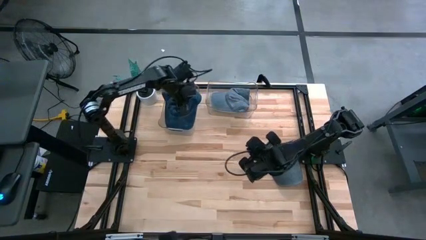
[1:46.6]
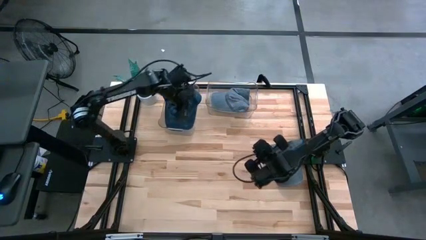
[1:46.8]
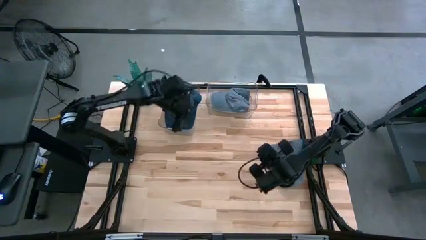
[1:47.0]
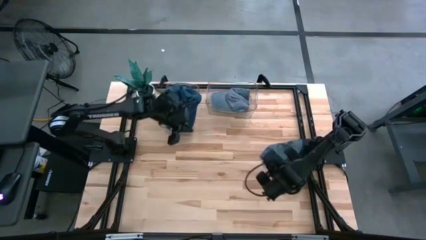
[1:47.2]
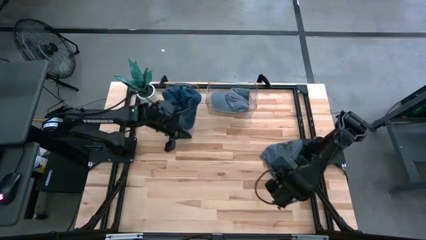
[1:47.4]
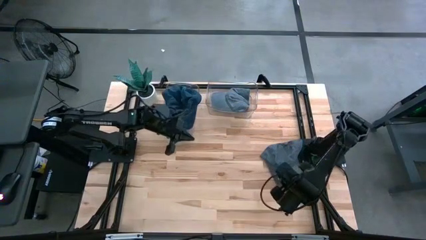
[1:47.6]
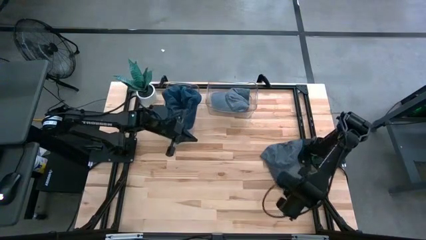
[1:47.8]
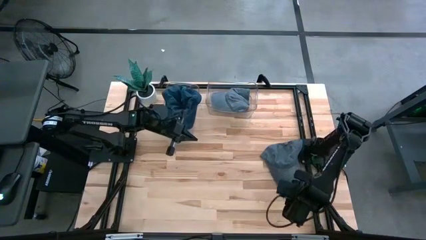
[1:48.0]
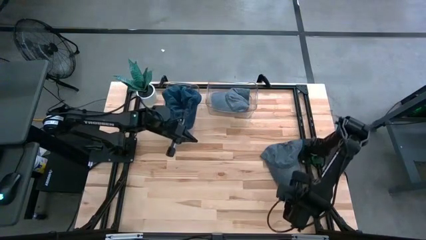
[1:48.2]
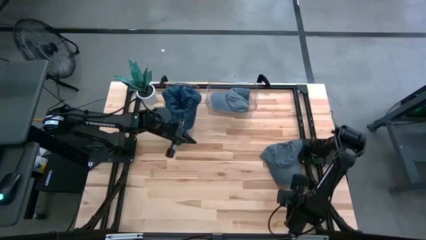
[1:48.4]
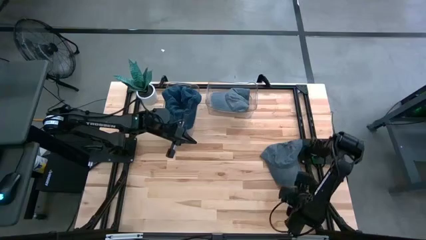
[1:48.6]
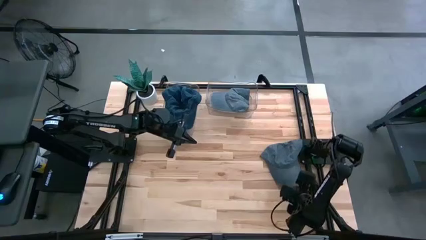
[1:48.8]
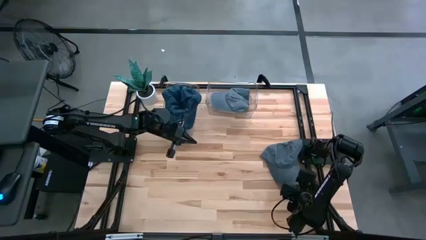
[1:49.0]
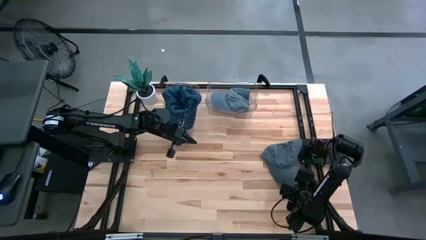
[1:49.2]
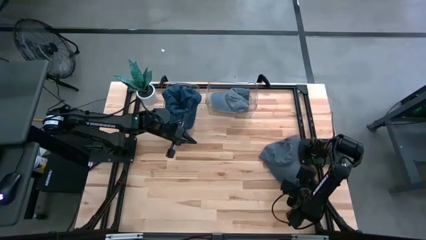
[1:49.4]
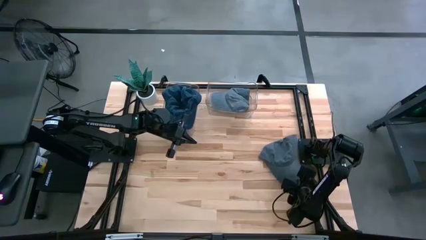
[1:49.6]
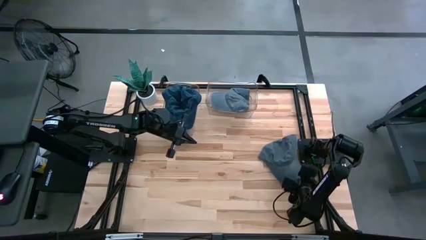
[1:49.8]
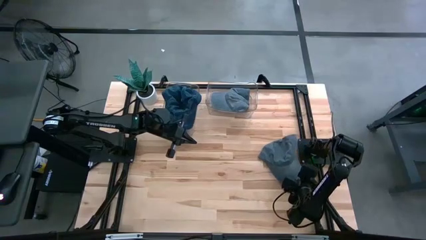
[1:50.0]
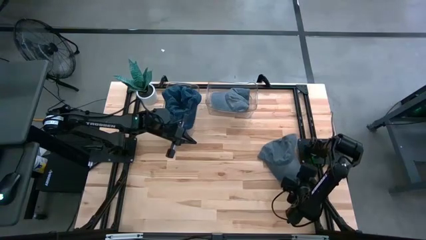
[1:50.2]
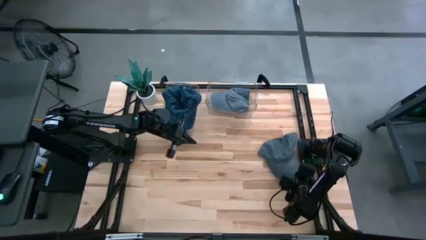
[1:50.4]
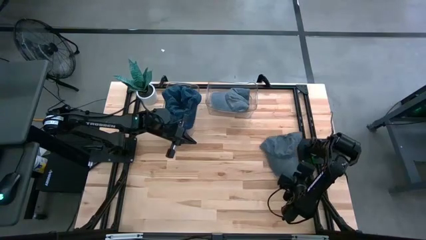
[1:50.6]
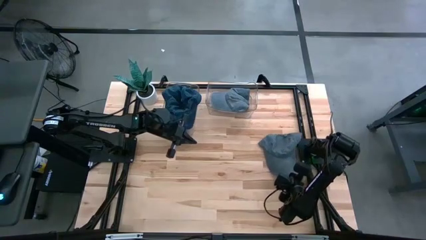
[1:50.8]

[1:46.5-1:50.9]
Task: Pick & Place hat
Put the gray cap into the right transparent bin

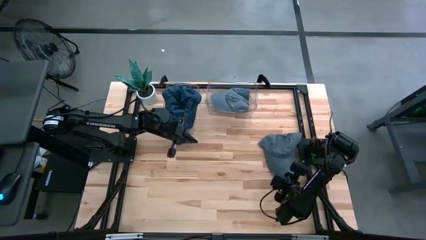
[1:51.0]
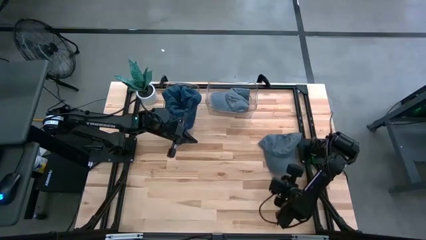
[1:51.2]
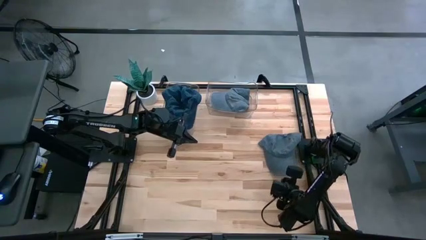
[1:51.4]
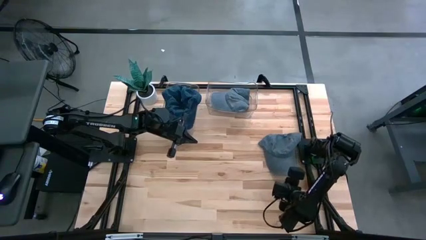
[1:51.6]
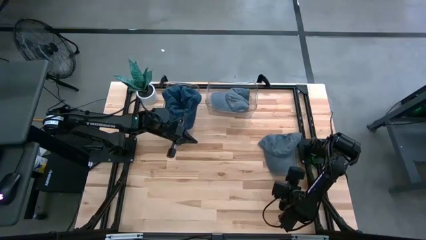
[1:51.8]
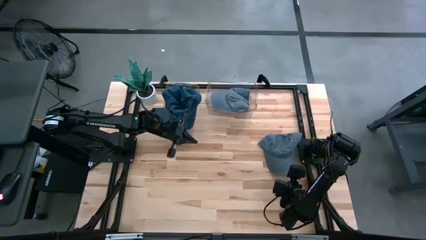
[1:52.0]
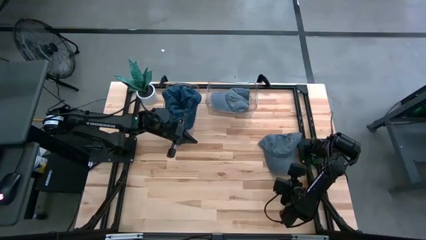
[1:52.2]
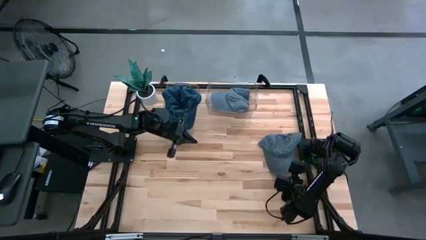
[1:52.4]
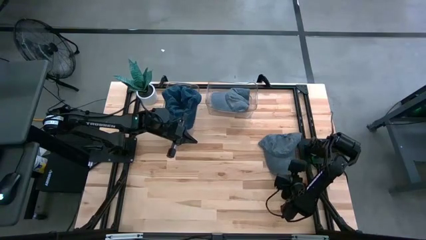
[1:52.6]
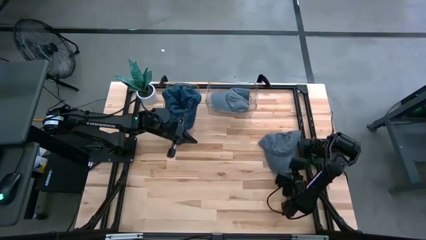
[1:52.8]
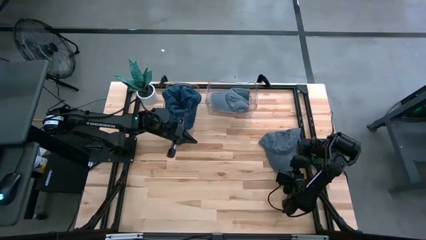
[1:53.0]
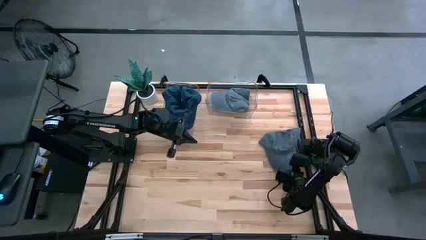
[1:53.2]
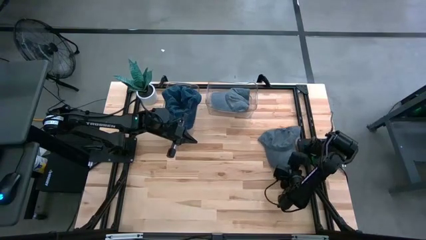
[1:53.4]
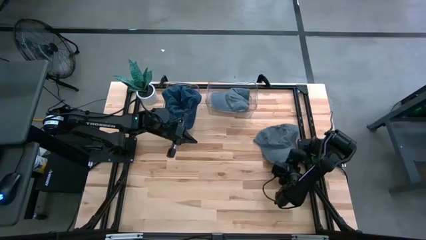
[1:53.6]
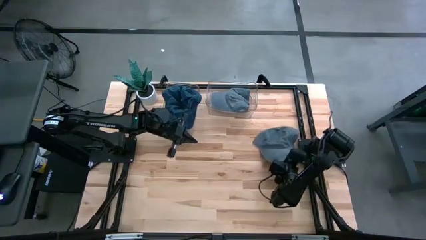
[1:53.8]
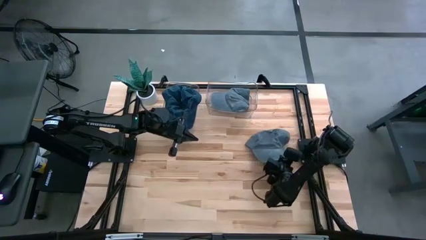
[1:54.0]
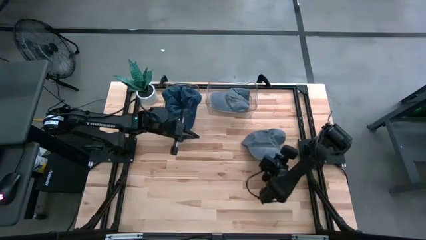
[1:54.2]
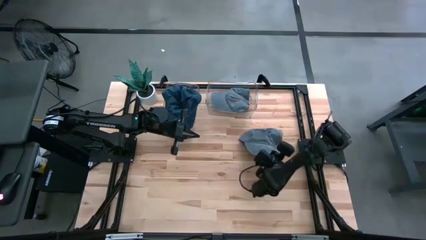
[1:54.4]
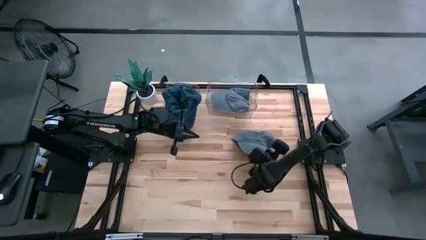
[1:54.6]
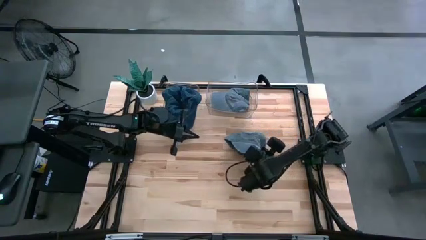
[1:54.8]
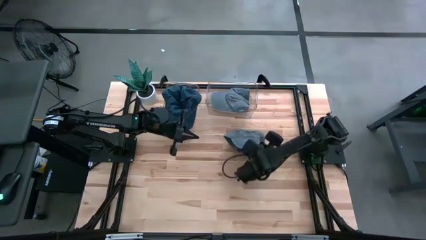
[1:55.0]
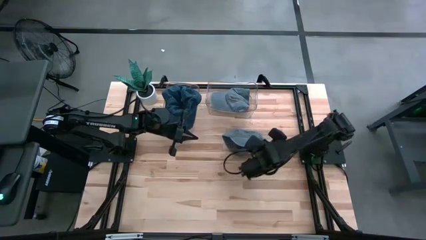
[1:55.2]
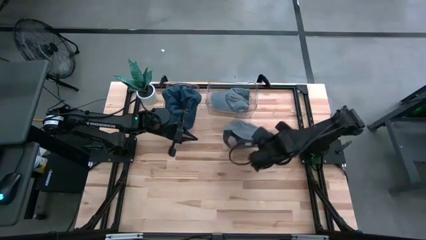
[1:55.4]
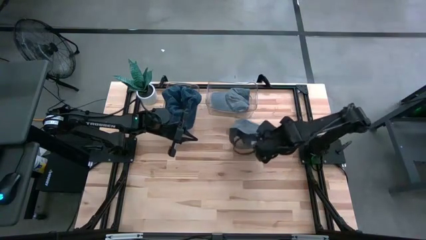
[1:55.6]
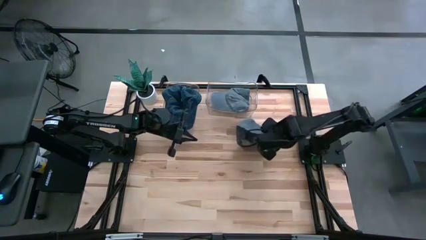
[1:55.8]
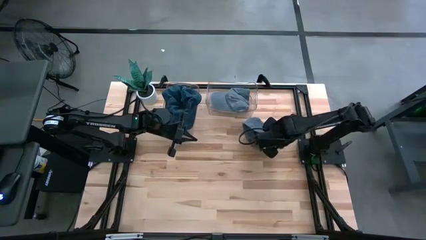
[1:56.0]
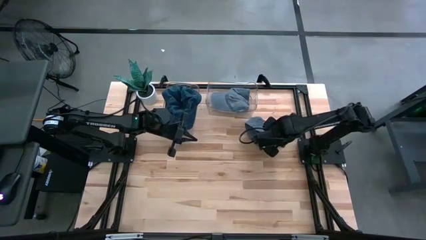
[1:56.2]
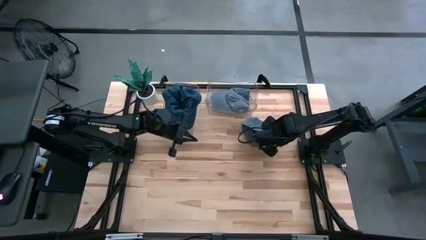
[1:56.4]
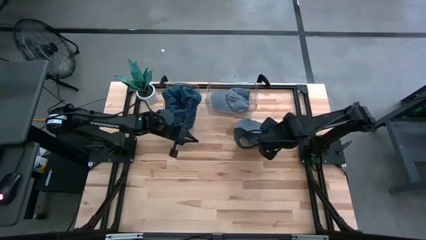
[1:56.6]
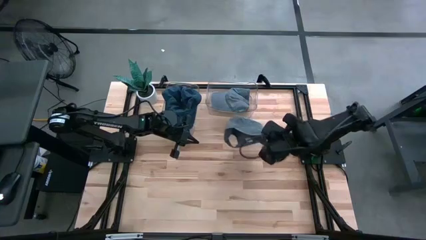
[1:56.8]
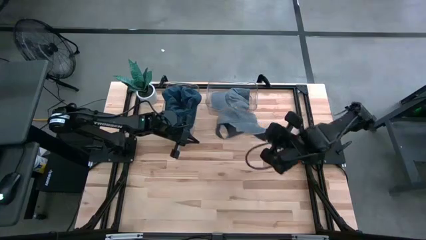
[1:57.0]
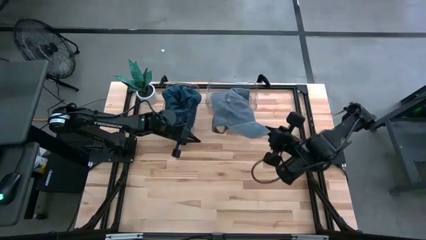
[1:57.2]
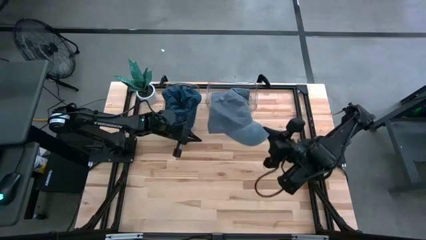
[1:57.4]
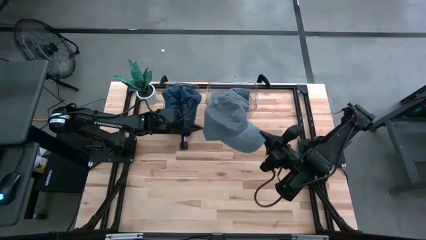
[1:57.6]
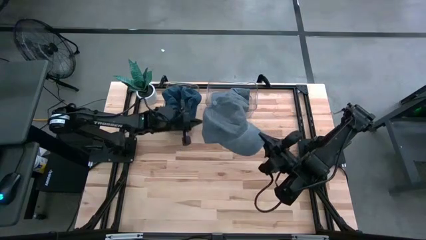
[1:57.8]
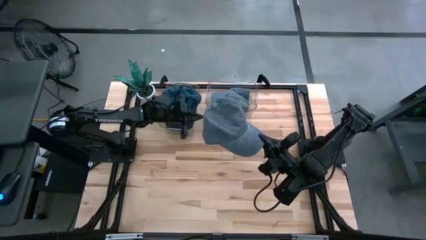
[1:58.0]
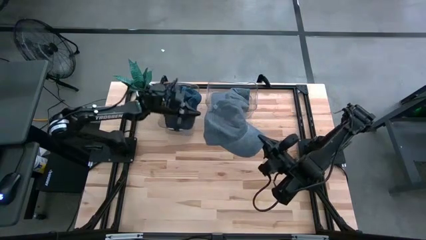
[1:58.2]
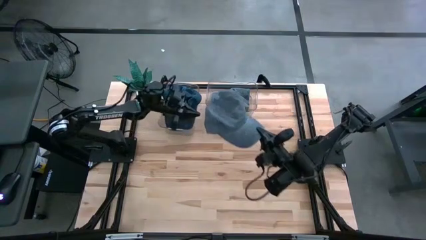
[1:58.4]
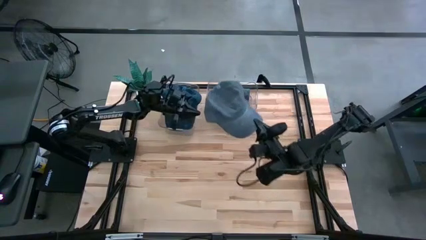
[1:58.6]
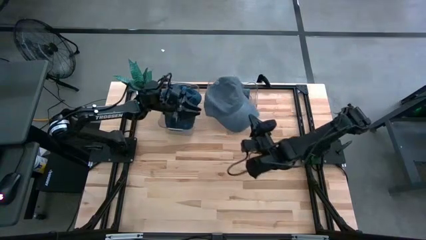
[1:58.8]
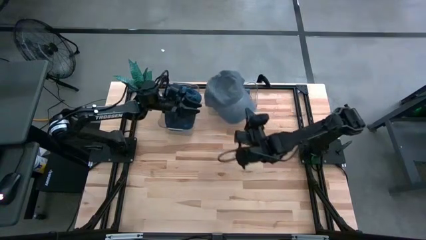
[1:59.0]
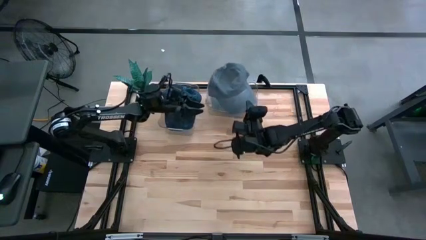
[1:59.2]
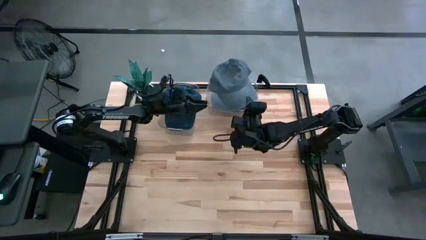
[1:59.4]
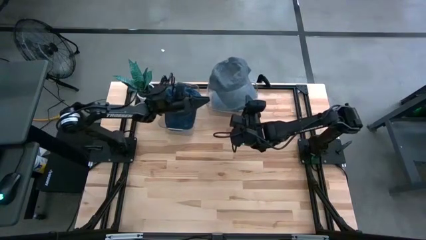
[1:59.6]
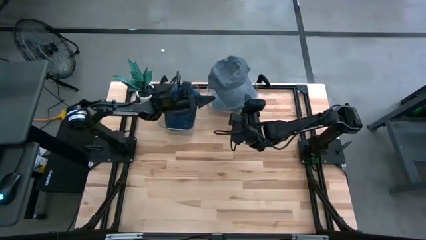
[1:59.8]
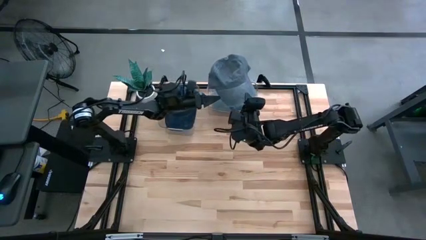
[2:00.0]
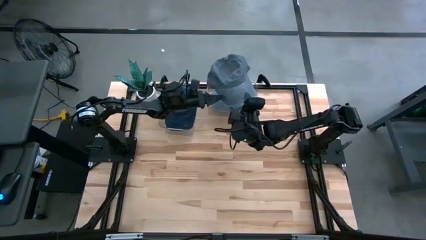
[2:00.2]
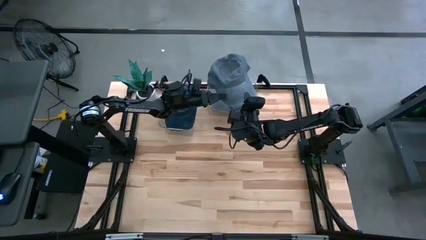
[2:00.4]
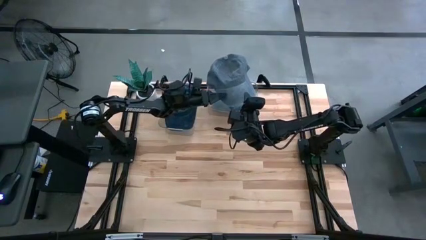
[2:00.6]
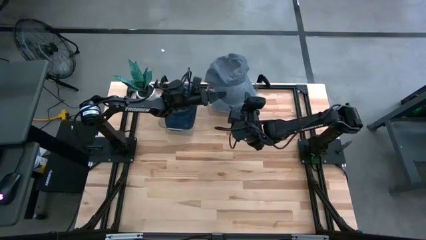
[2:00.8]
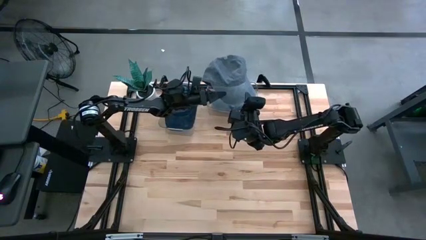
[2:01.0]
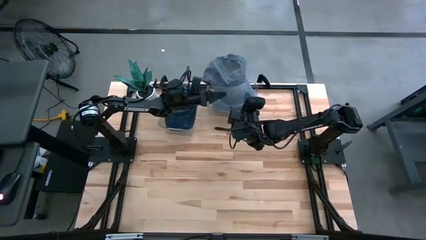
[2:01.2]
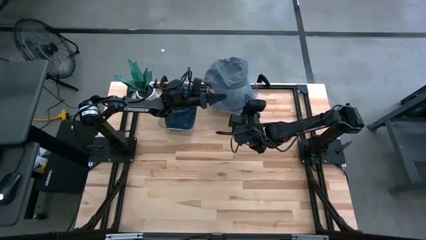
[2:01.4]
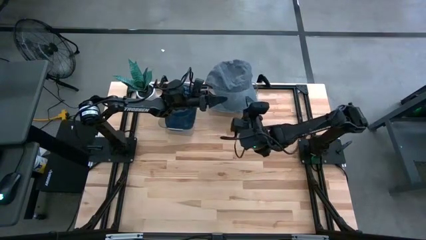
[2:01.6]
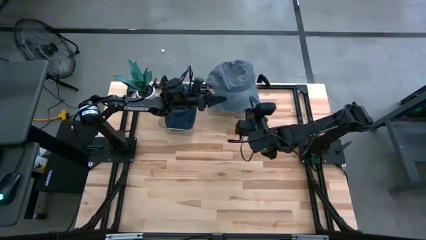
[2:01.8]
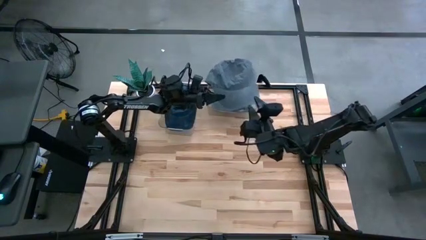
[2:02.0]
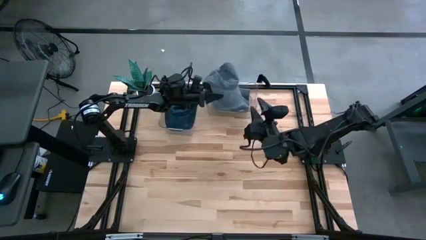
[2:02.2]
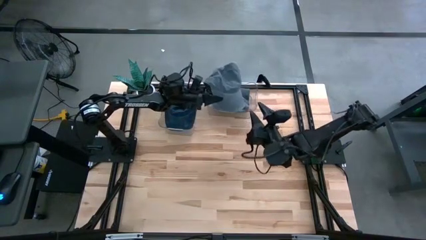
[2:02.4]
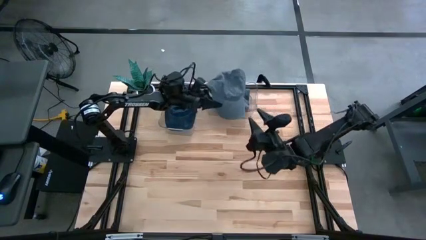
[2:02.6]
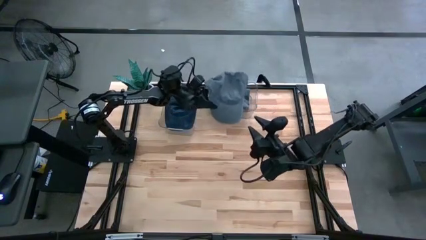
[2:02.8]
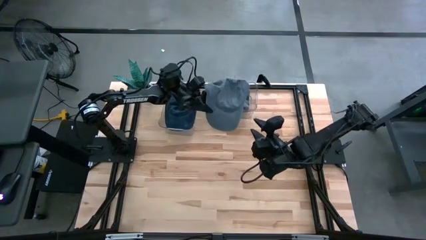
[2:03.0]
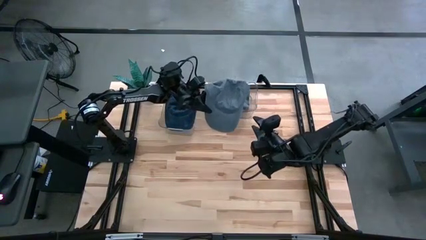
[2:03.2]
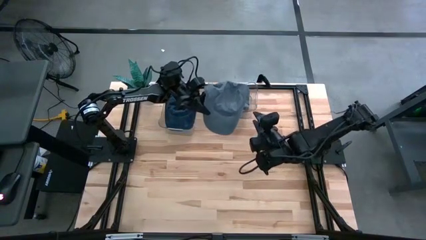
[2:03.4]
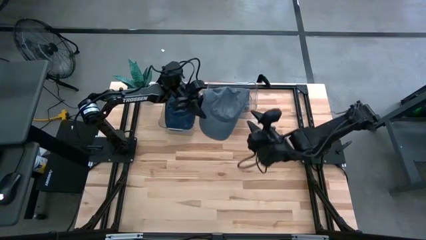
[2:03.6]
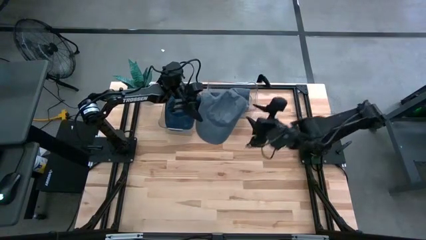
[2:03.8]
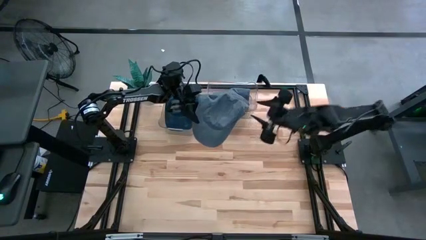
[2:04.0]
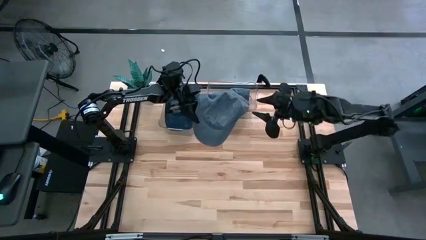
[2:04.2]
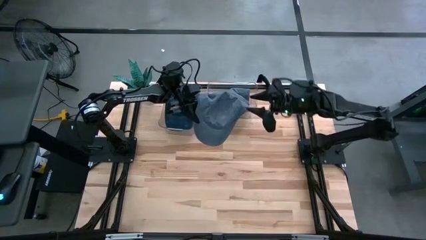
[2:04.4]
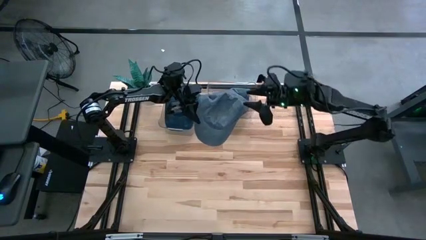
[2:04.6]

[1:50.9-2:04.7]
Put the gray cap into the right transparent bin
